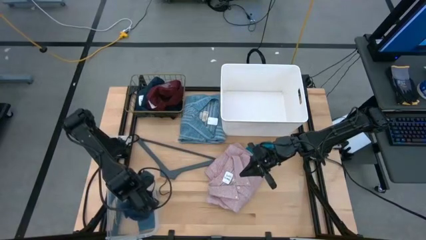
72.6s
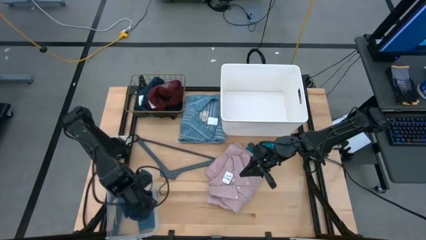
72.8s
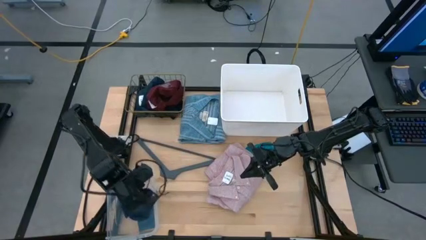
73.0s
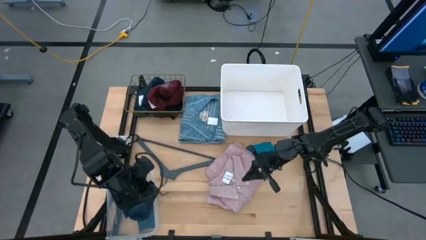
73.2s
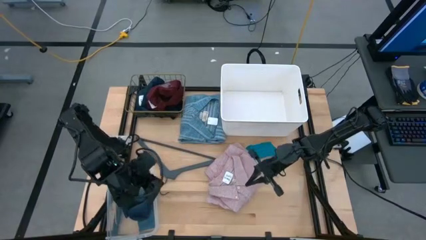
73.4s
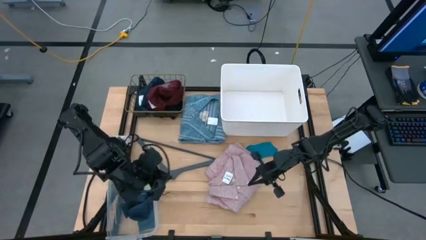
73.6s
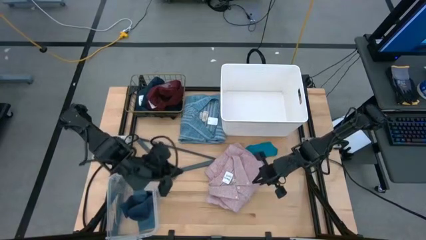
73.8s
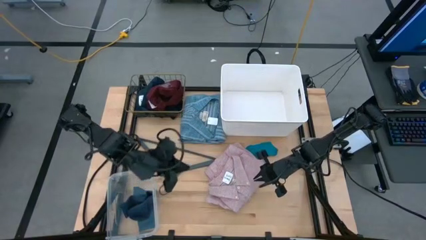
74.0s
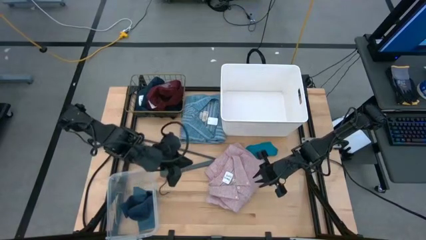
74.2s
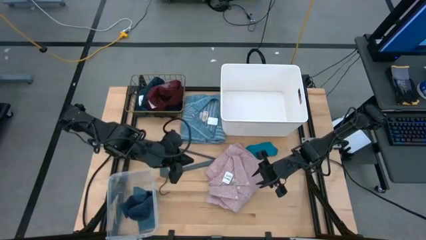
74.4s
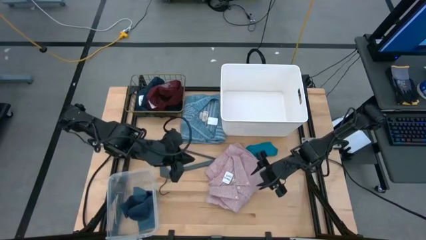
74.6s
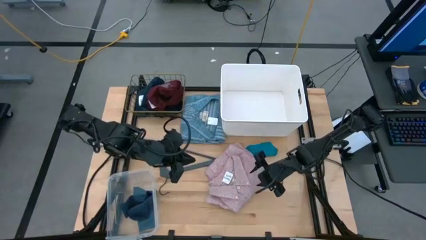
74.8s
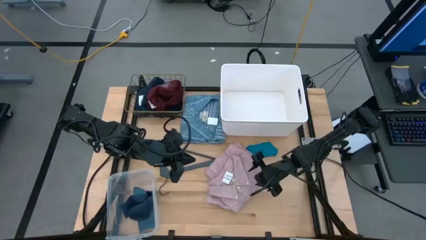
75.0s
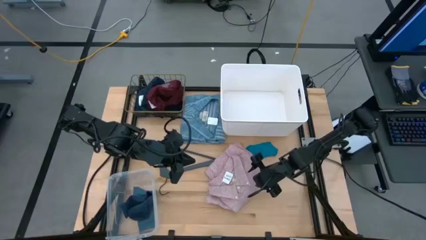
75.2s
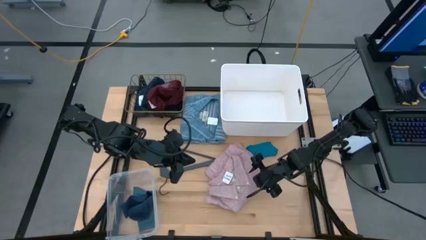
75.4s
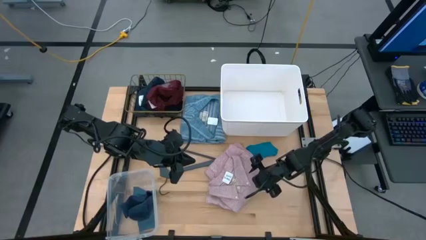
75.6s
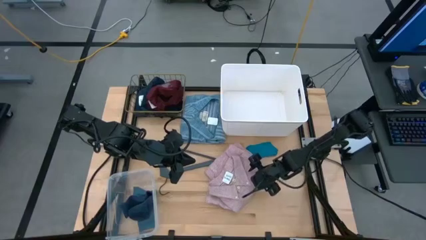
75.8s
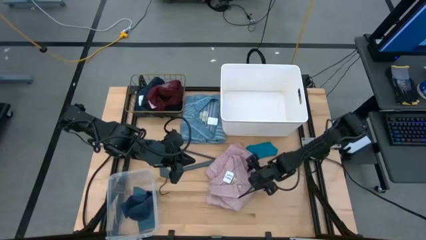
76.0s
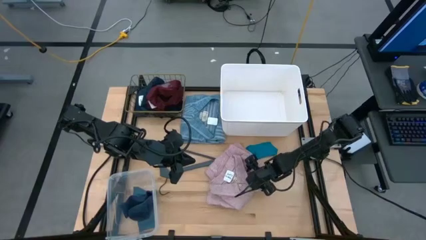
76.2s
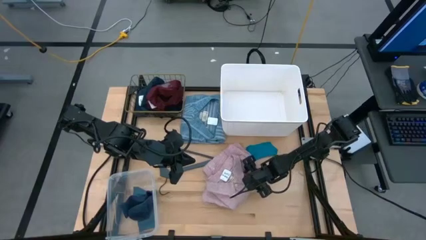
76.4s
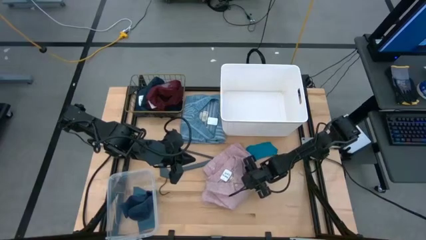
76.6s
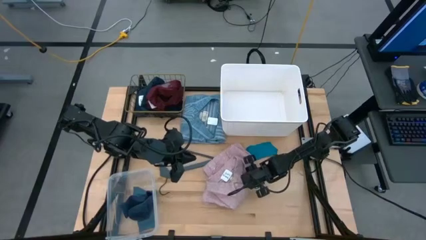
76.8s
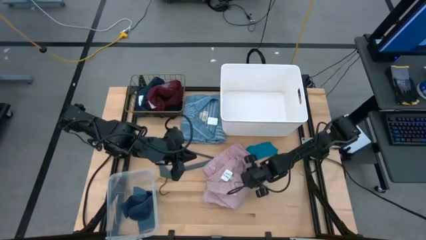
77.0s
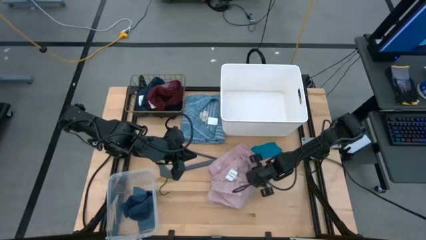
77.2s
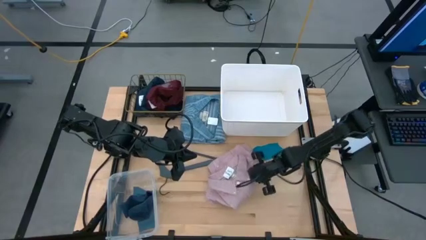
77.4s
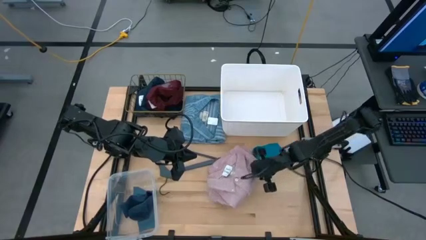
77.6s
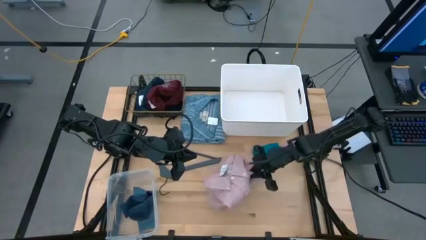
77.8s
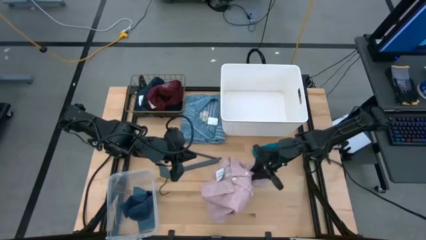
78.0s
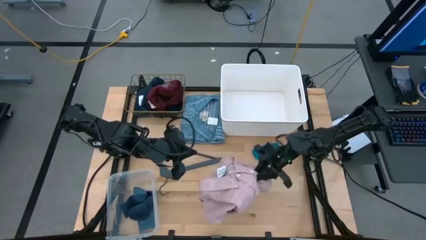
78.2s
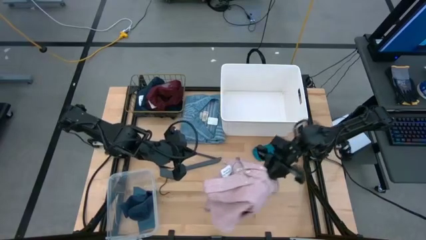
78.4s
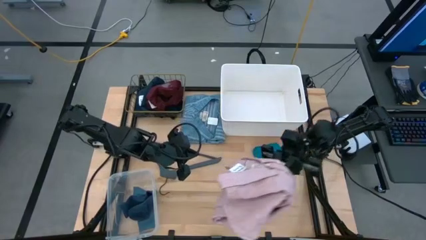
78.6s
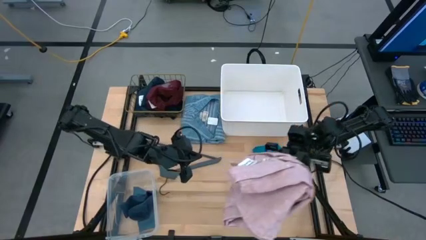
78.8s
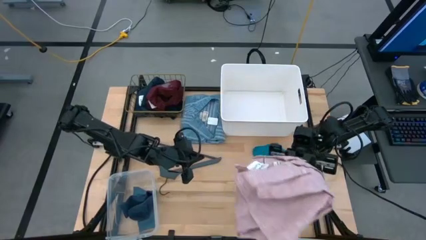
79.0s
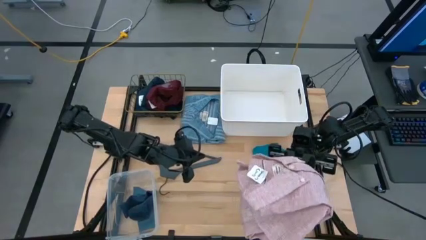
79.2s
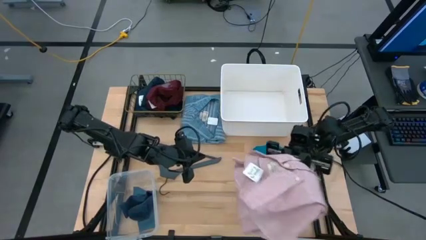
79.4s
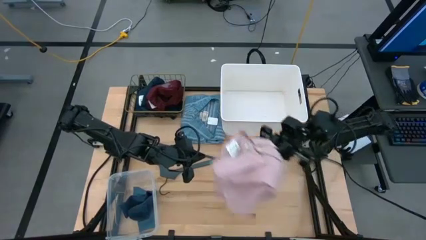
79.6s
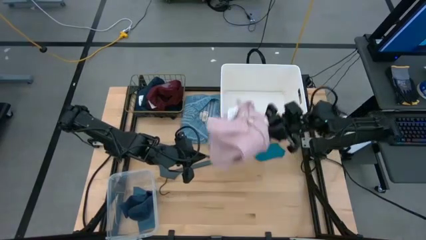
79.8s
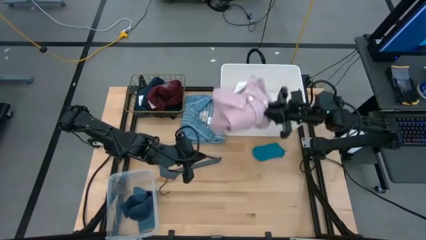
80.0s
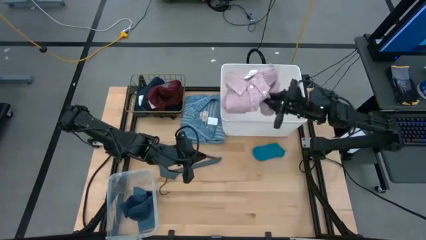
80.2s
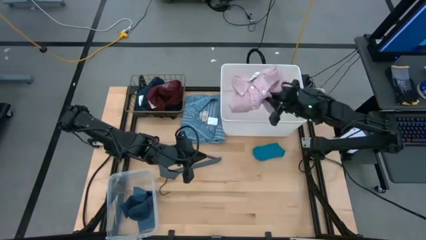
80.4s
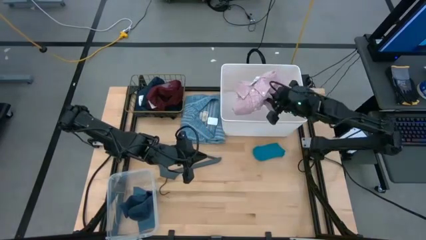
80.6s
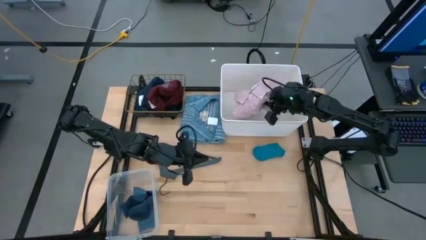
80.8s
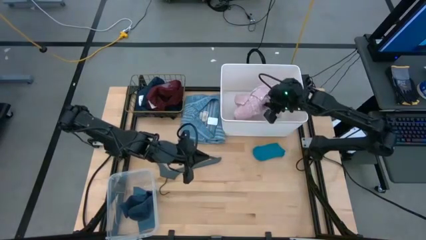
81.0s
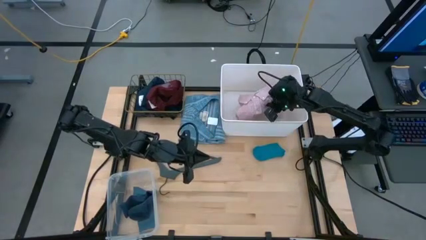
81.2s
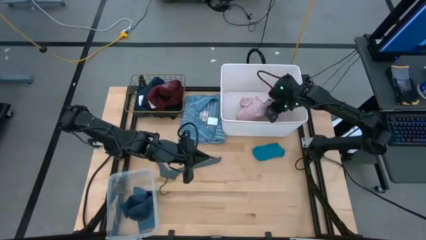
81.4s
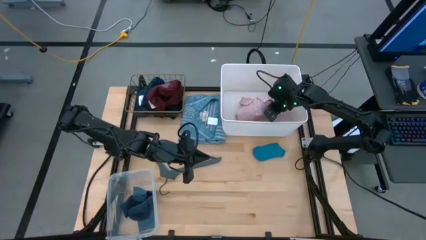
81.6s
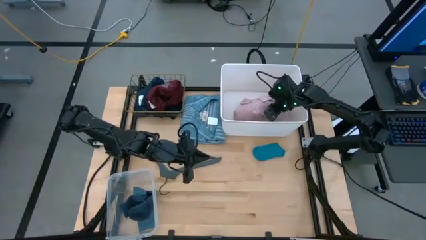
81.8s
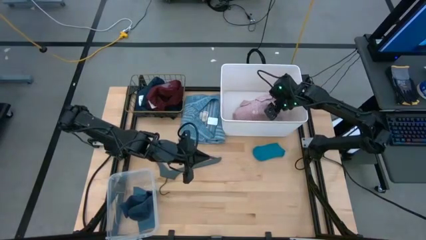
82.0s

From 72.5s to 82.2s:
Task: Pick & Place Cloths
Put the red shirt into the white bin
